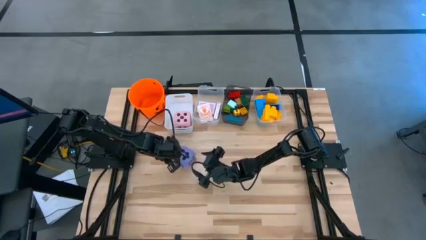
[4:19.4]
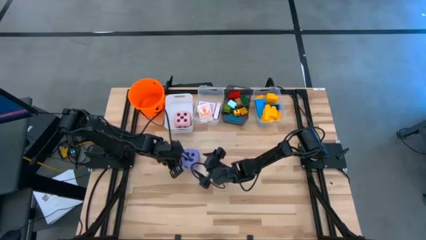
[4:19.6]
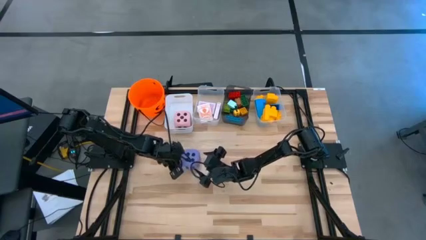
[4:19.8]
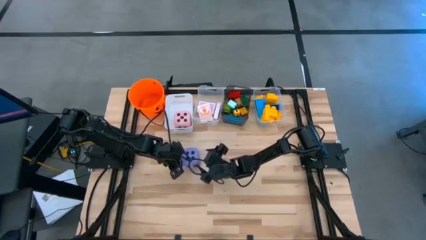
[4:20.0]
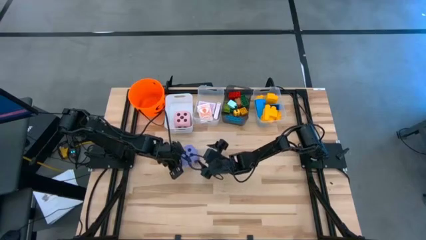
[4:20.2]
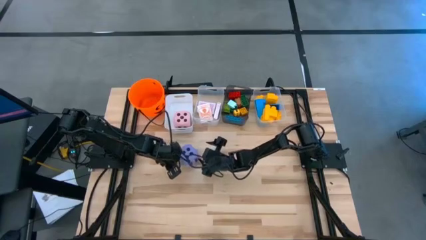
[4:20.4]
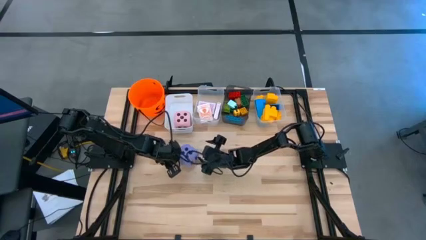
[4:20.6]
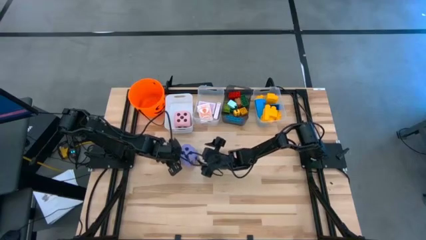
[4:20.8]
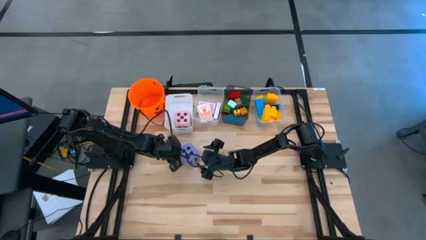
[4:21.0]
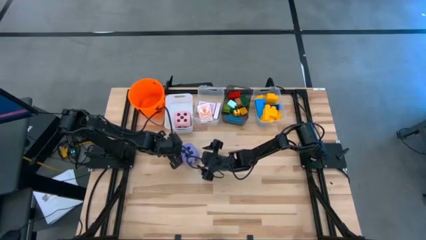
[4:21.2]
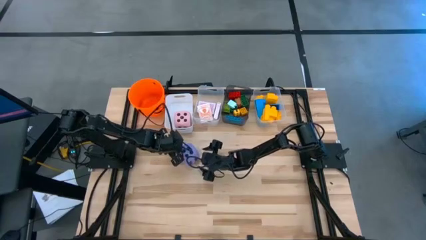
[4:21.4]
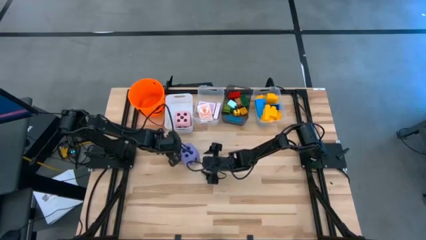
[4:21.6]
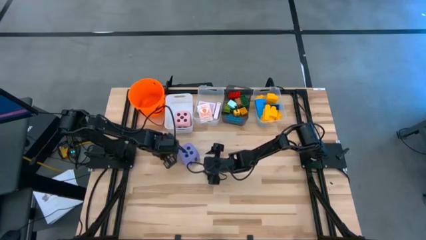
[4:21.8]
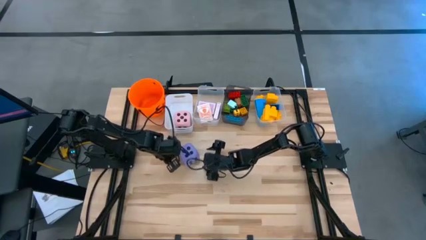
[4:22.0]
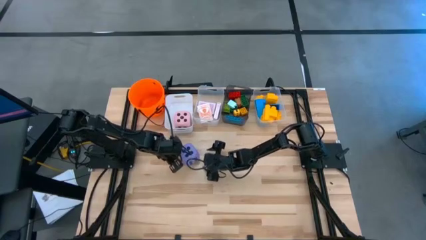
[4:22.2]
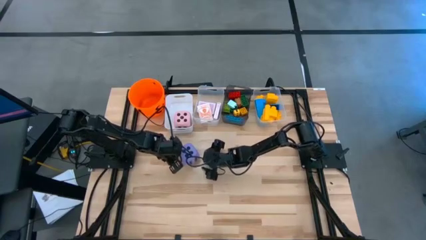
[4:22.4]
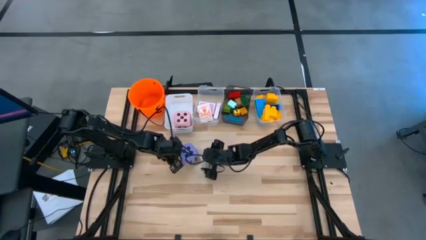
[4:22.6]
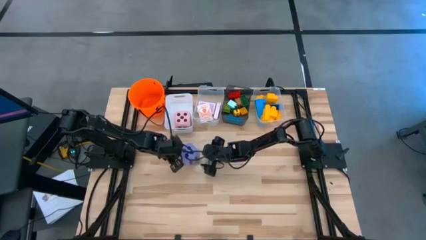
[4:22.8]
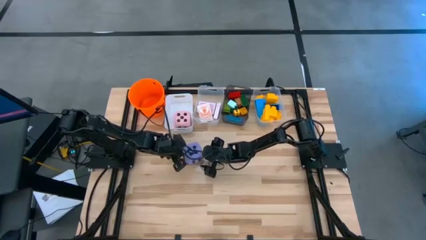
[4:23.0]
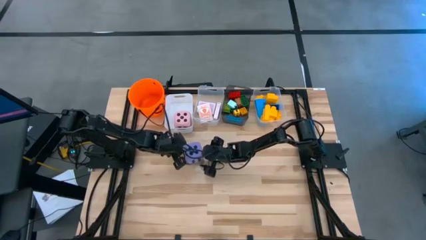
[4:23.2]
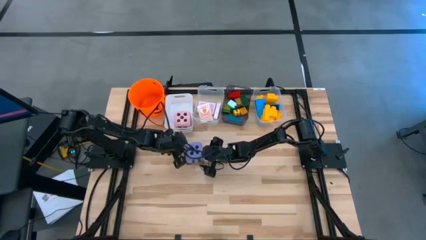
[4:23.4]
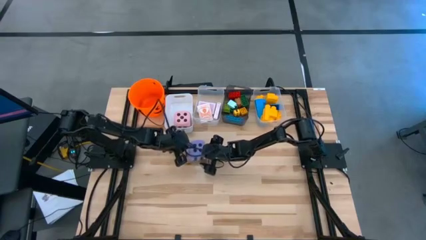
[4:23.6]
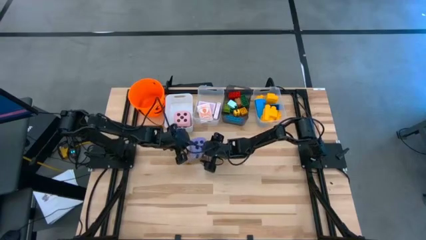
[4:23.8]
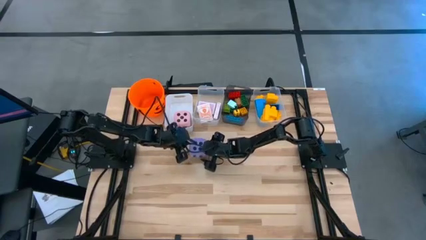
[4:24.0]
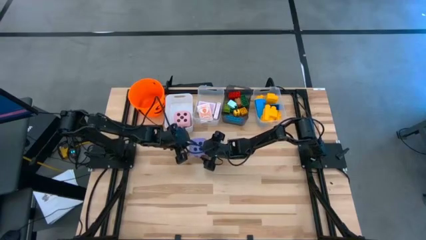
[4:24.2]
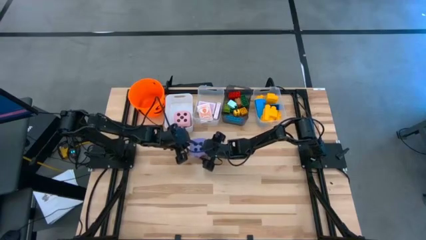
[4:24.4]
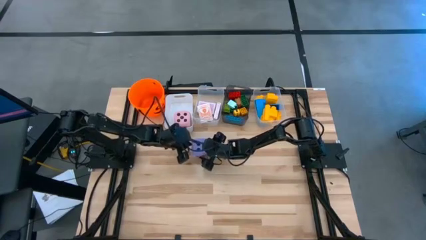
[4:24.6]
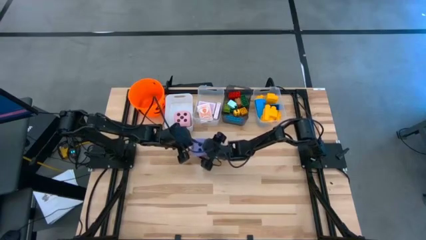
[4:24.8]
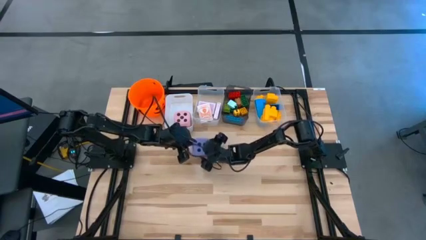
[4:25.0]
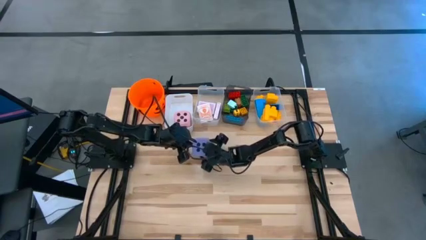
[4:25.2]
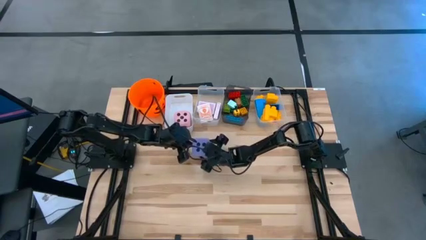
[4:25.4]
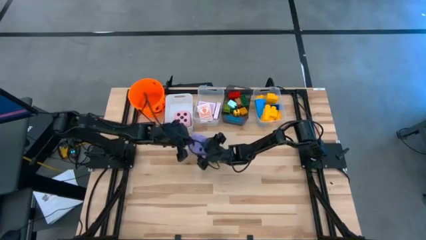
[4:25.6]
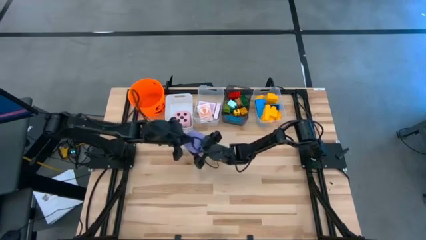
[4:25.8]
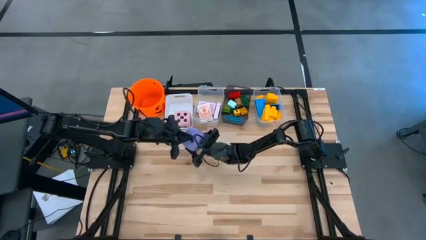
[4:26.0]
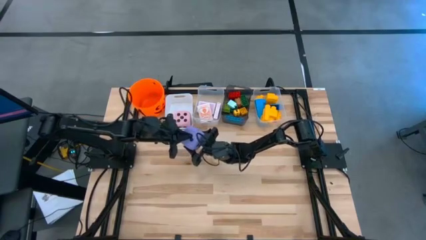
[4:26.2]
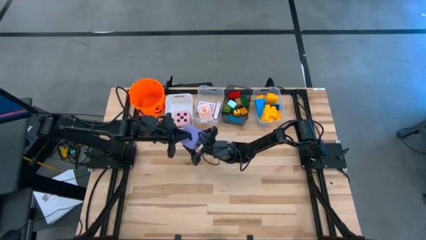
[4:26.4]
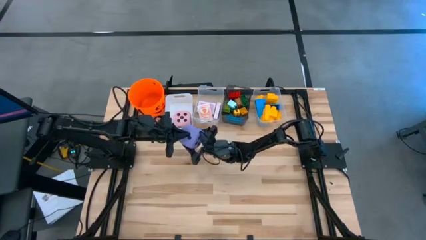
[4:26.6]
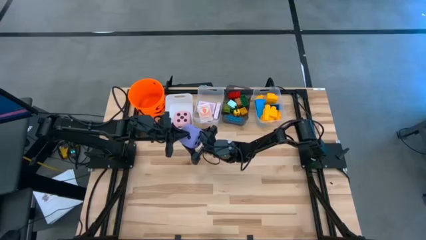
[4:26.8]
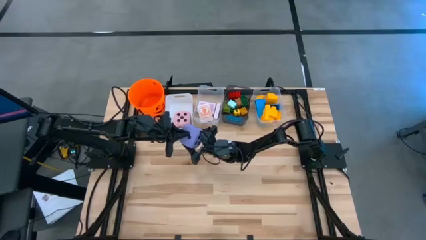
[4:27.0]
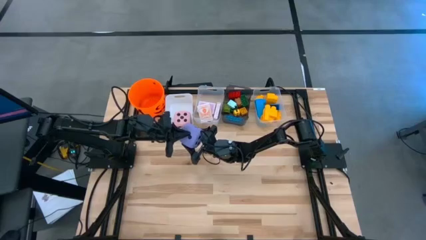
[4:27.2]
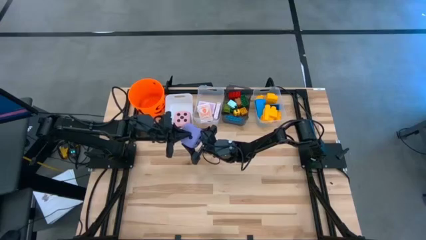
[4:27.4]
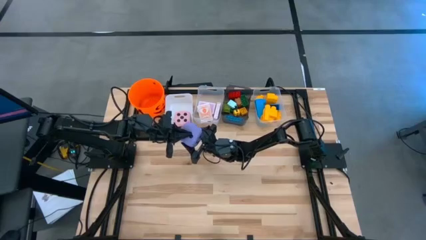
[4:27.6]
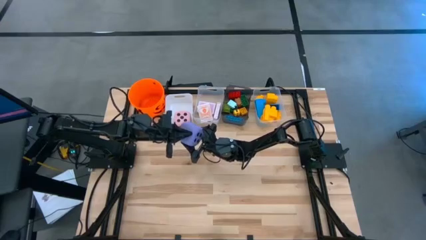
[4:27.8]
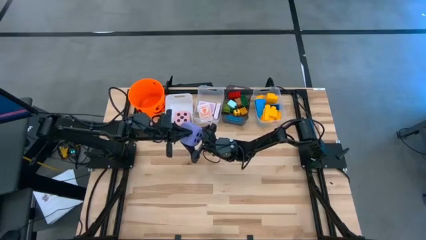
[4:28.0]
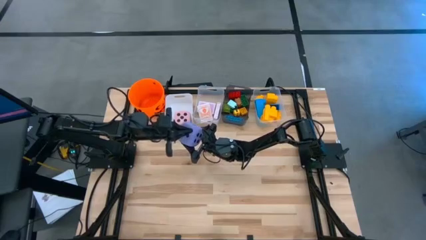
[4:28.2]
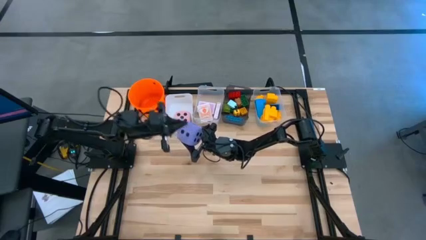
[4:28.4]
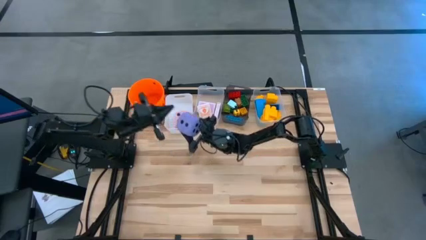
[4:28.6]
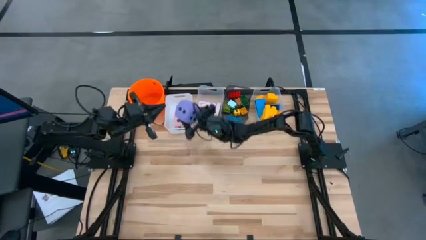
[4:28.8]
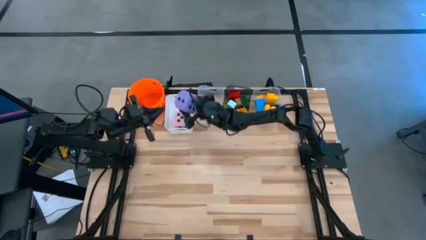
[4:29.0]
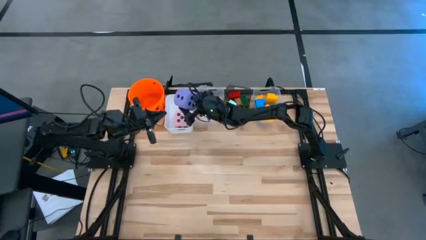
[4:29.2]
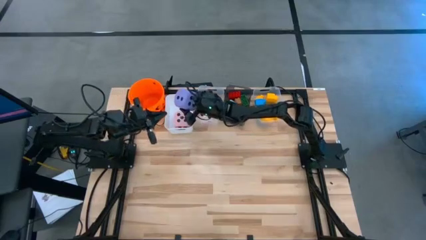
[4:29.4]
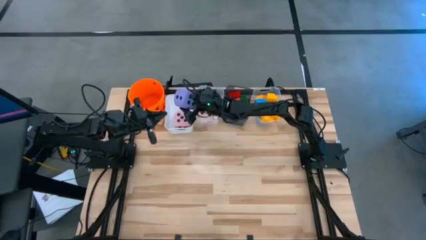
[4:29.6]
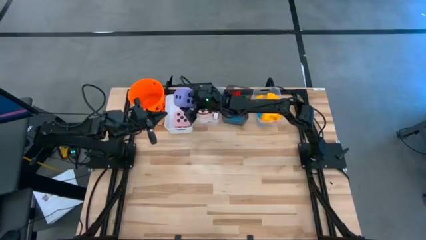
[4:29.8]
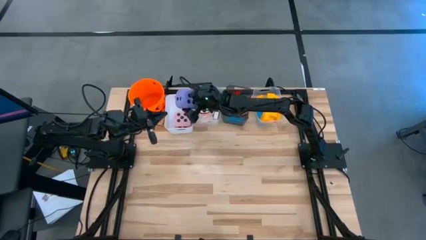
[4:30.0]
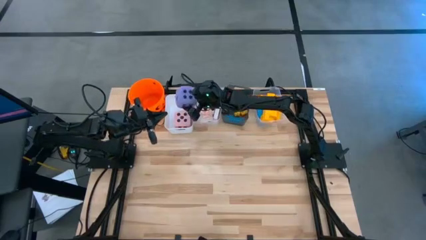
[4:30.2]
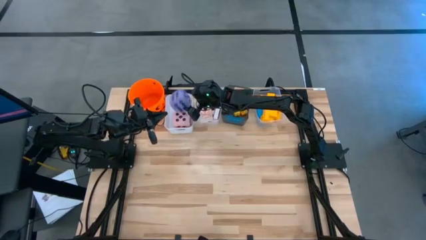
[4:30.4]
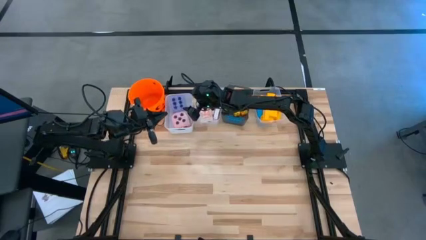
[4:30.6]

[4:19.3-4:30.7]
Task: Pick & Place Toys
Put the violet die into the white bin
